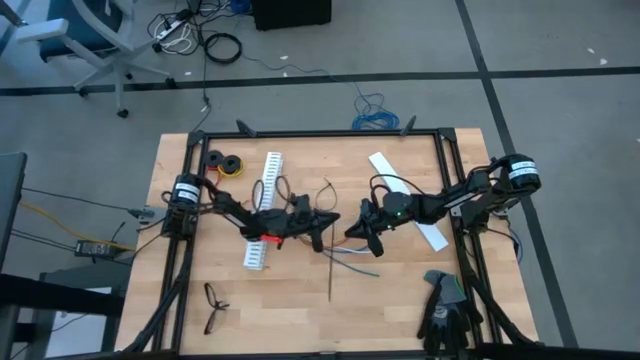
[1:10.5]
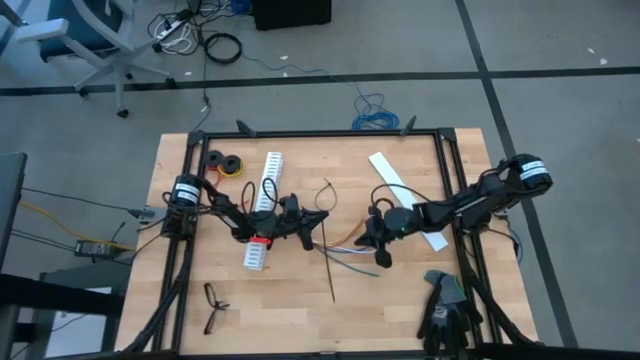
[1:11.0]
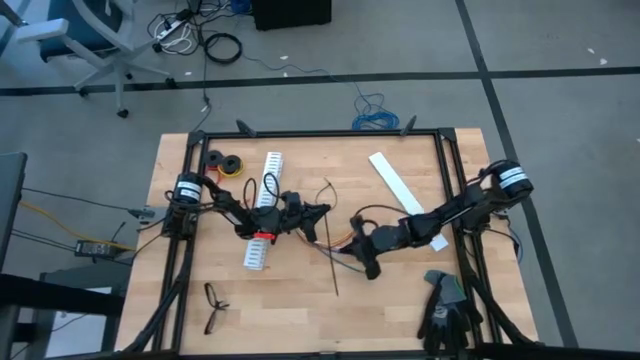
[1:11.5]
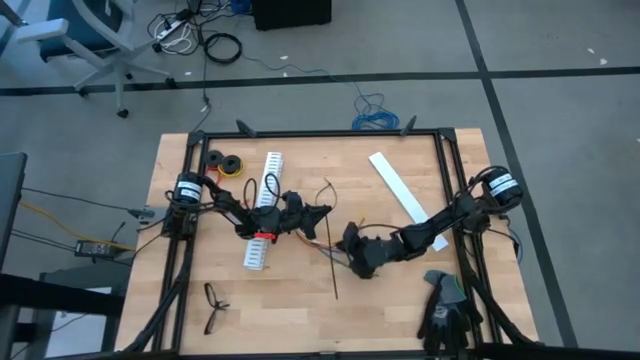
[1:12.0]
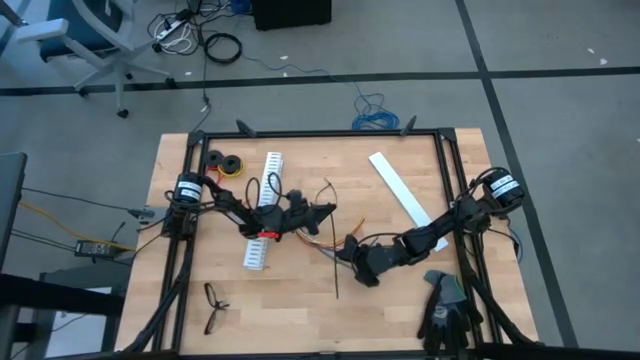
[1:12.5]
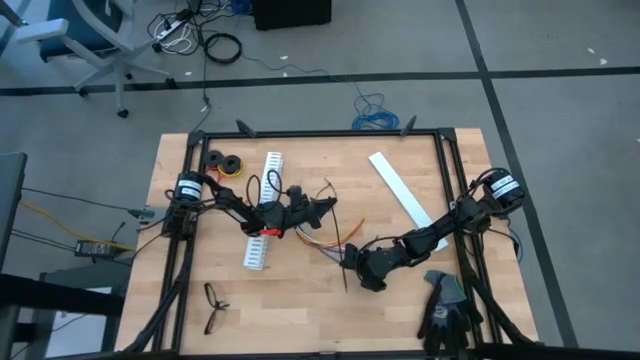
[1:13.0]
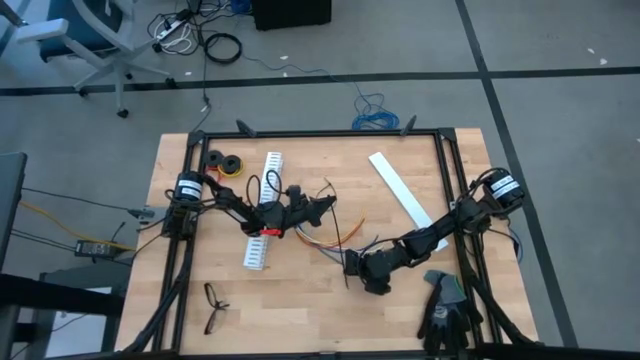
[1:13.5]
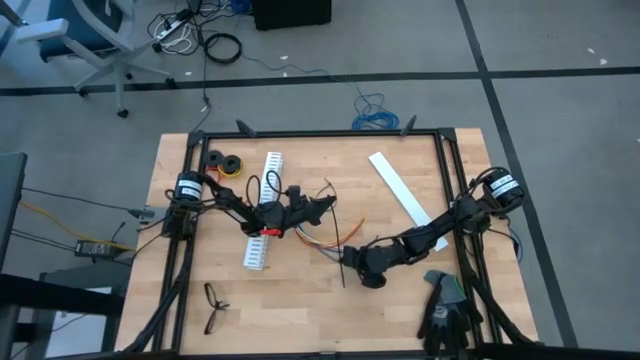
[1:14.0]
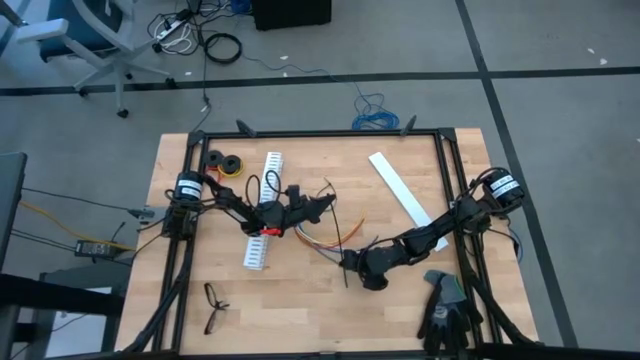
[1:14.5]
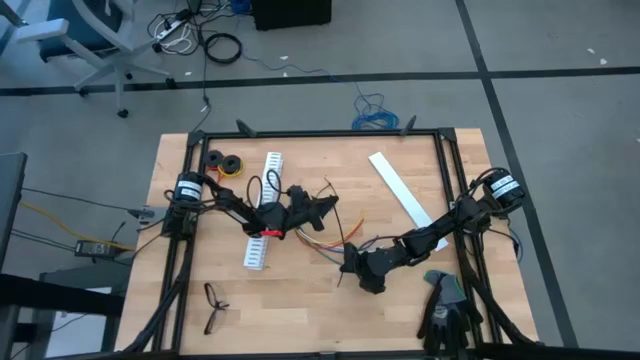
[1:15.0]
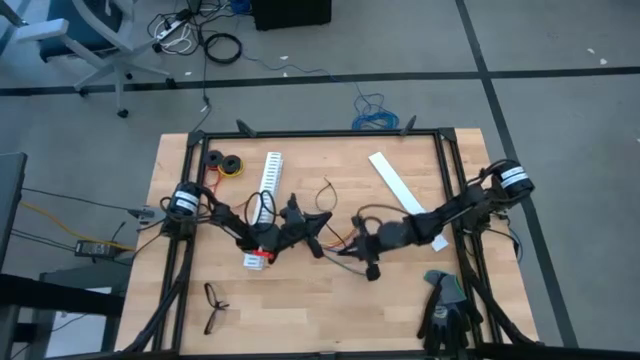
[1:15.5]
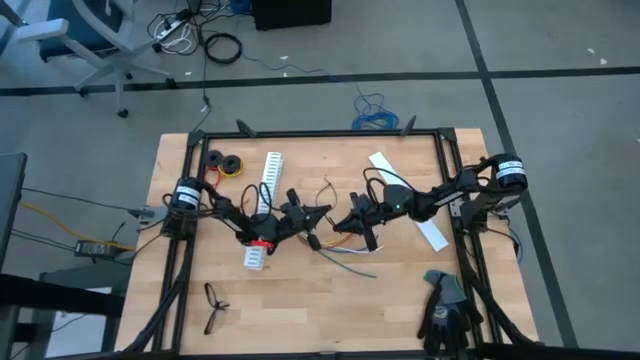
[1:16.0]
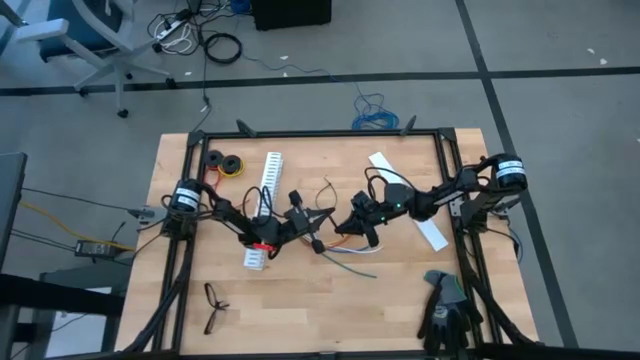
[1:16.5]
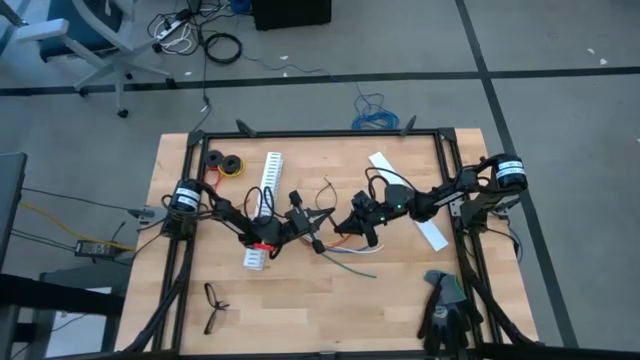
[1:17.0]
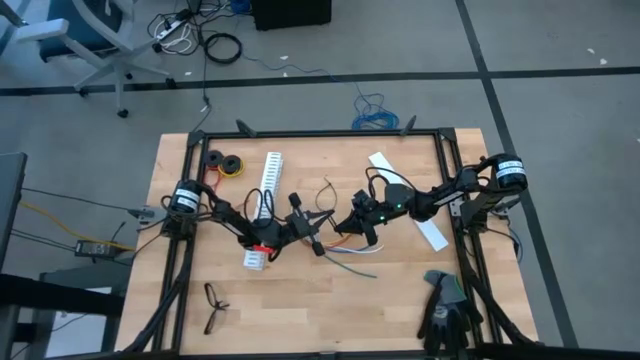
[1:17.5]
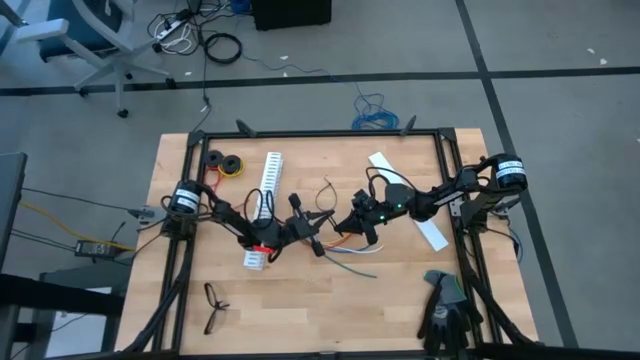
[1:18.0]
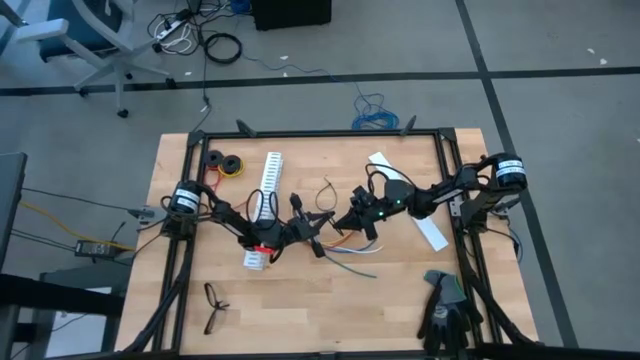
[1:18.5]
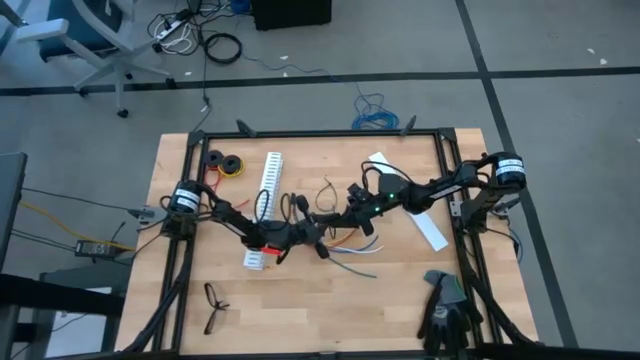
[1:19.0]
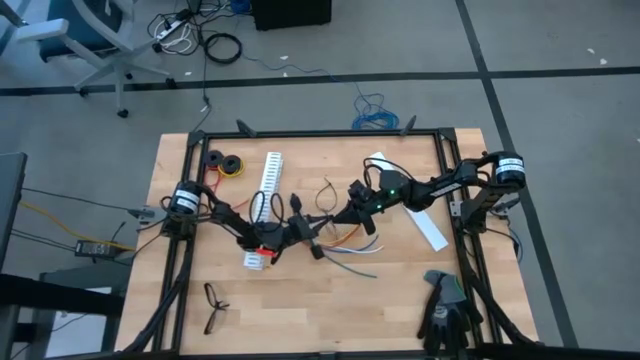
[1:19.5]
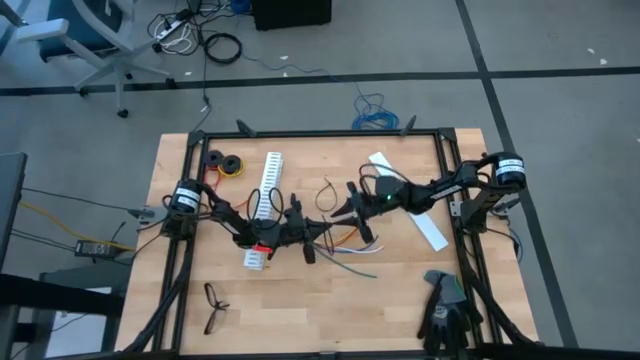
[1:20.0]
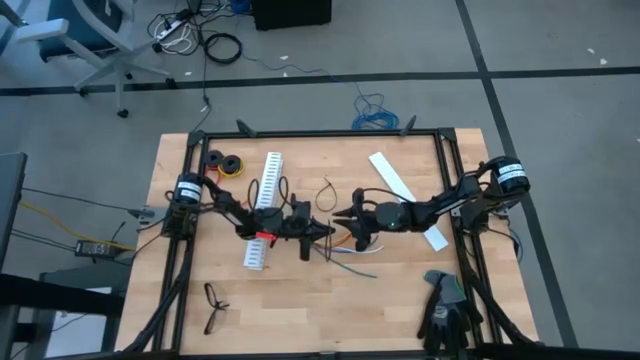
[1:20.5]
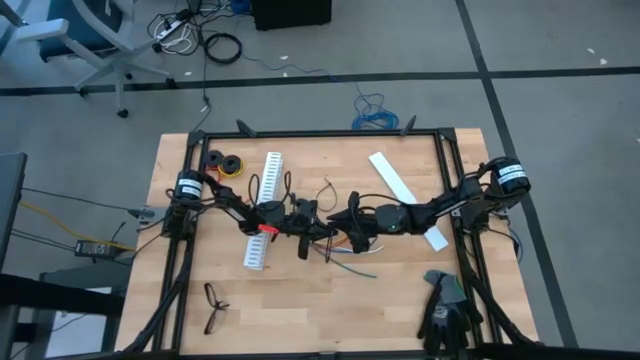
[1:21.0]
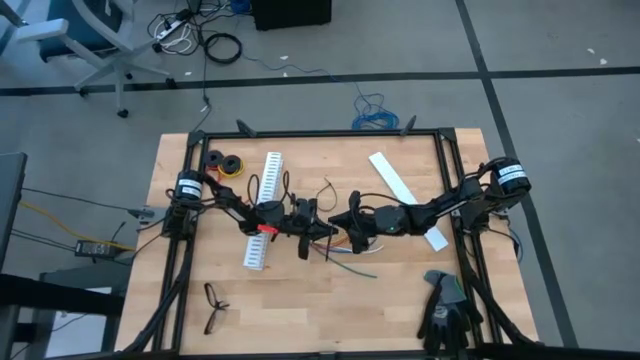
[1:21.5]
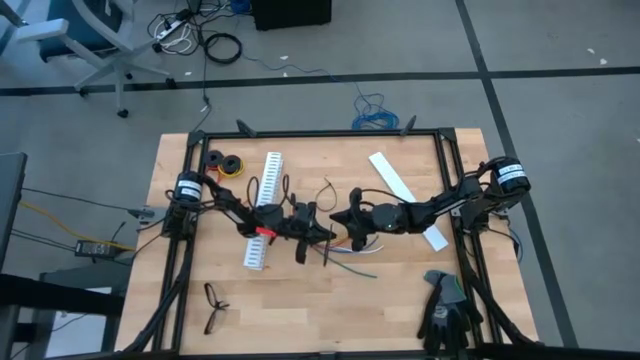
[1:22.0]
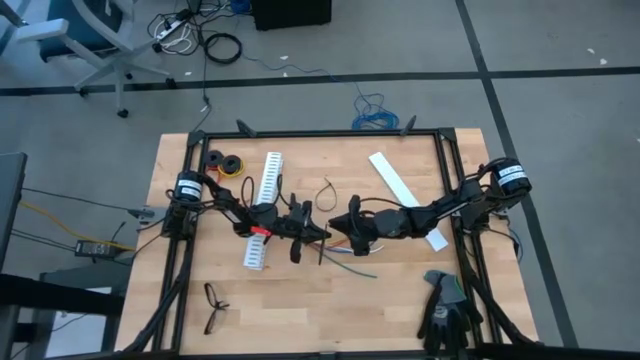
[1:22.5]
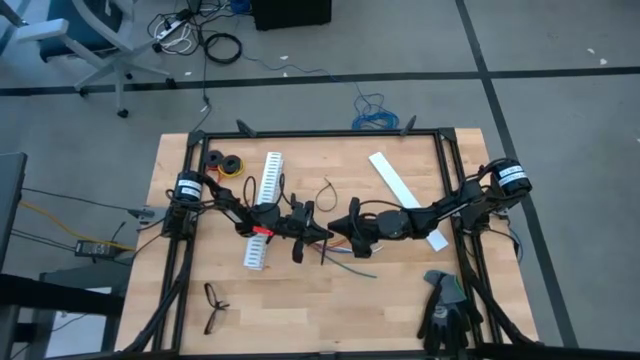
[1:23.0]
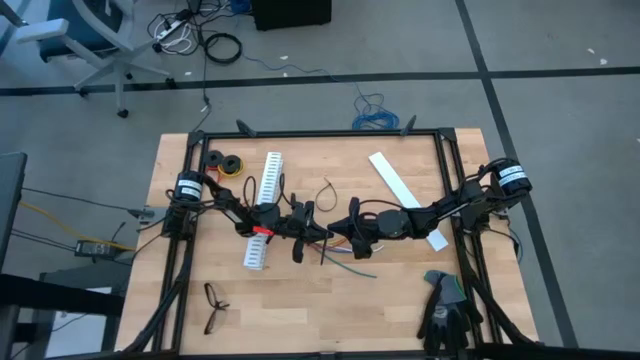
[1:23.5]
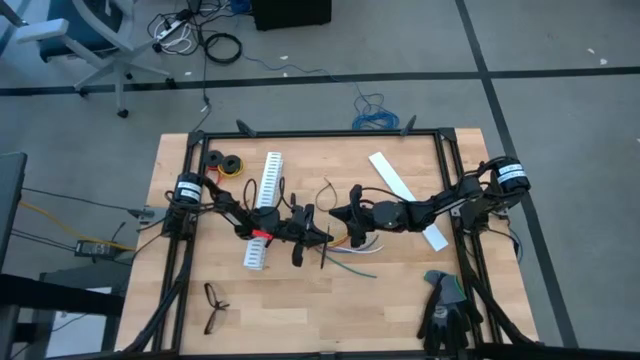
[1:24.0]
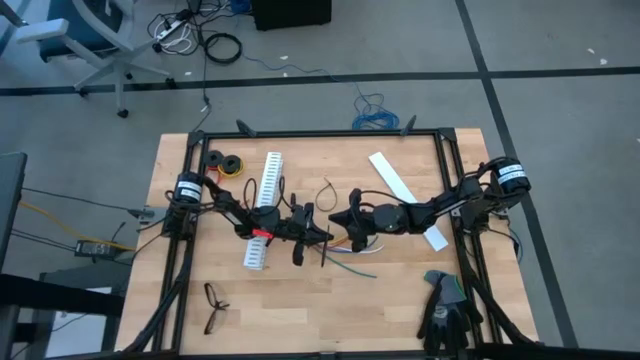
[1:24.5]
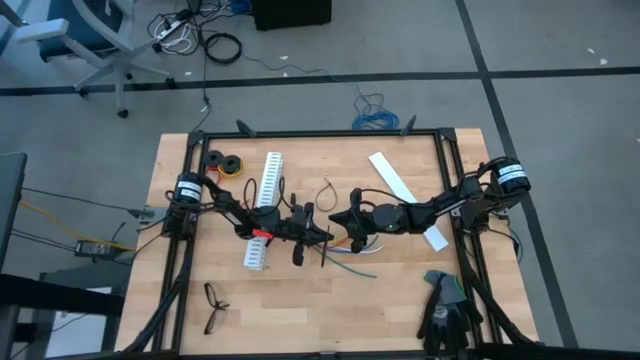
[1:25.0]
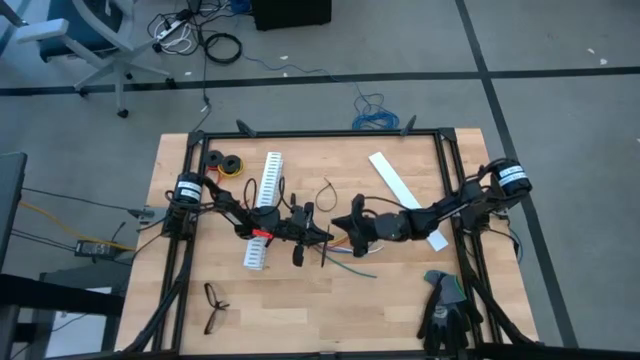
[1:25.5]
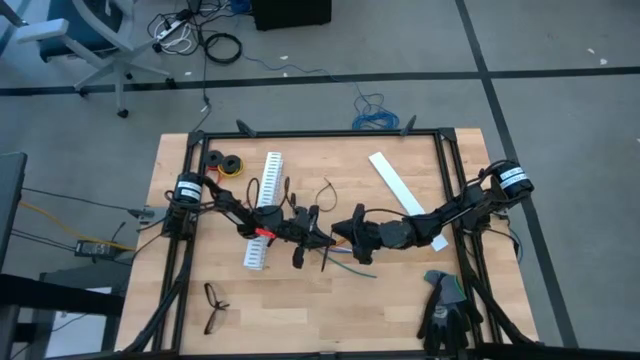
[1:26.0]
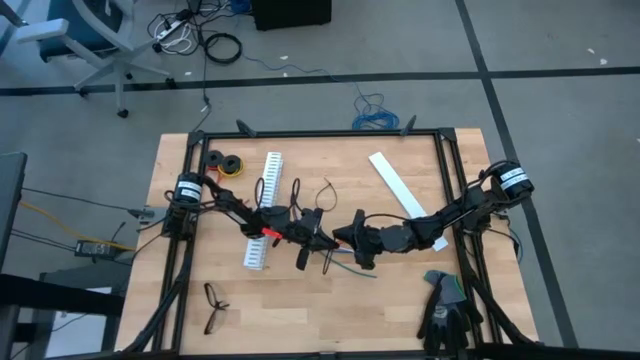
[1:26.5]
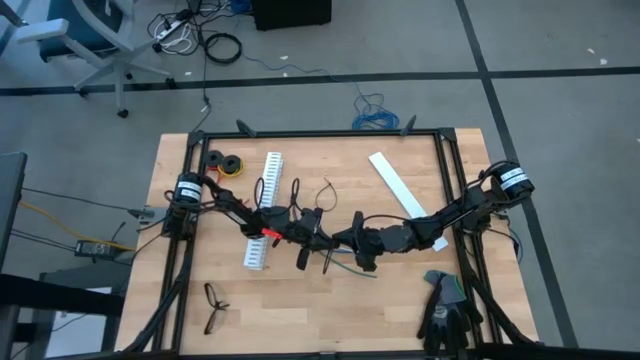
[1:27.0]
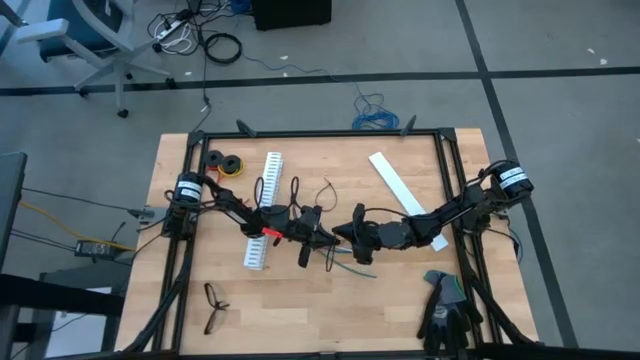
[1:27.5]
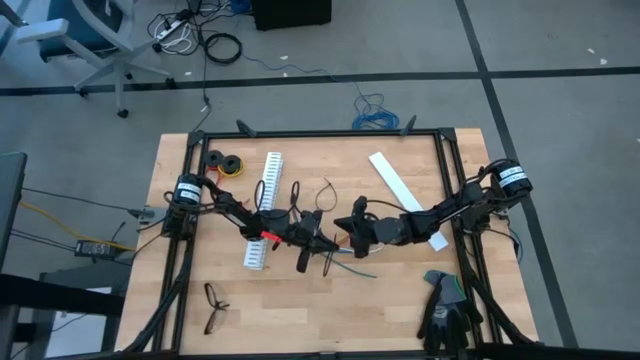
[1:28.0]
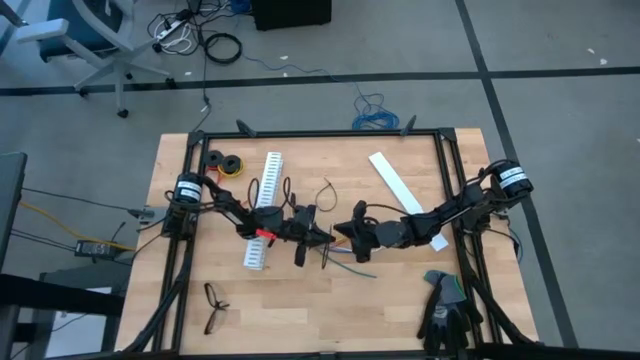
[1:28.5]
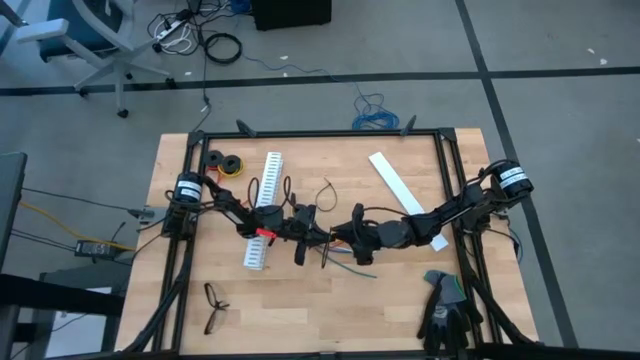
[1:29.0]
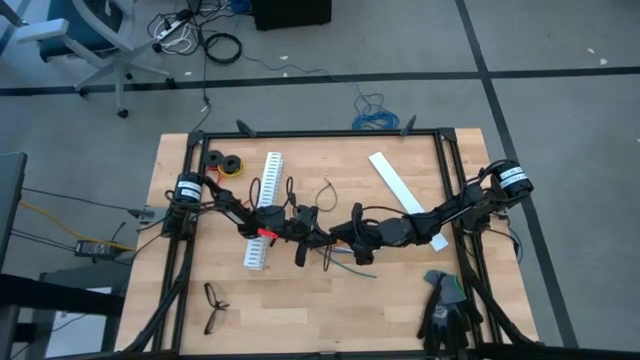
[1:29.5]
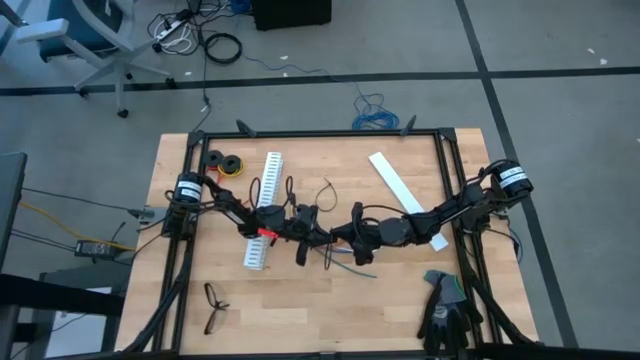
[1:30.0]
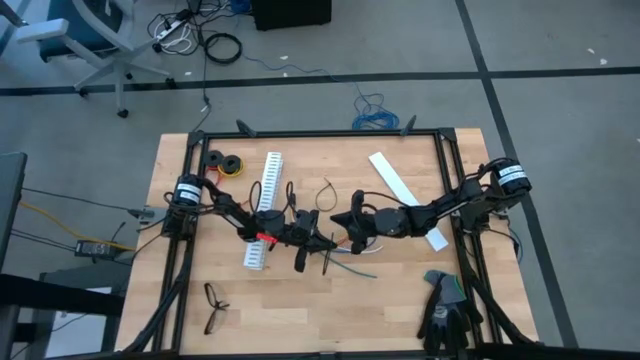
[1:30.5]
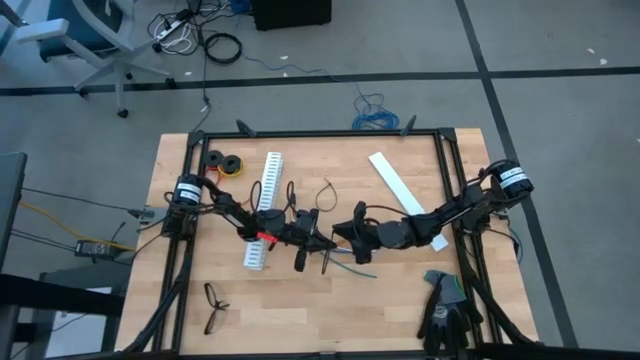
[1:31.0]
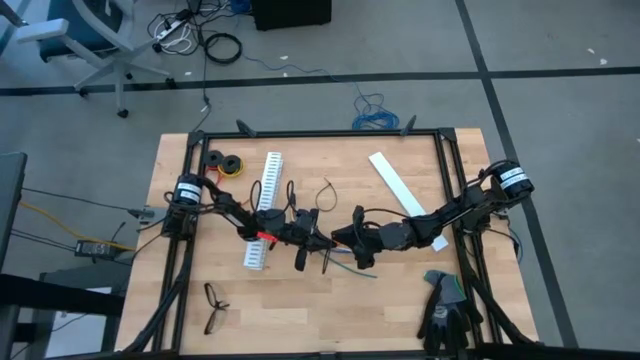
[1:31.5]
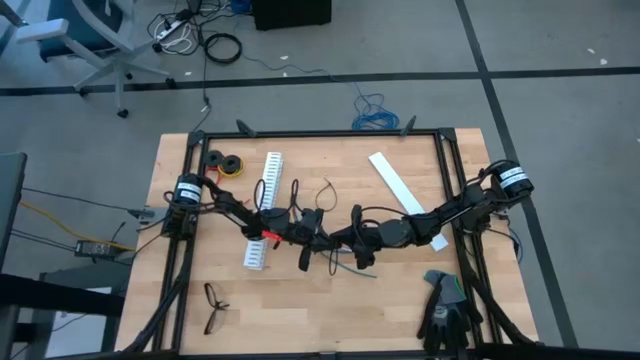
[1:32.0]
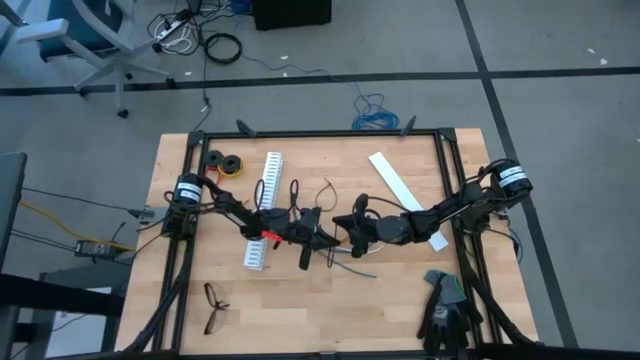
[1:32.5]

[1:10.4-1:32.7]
Task: Ziptie cables
Insert the black zip tie into the lock head
